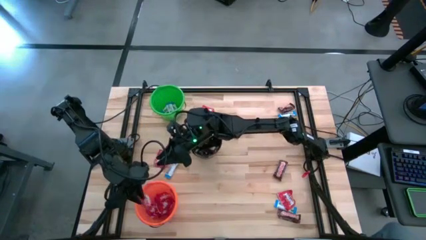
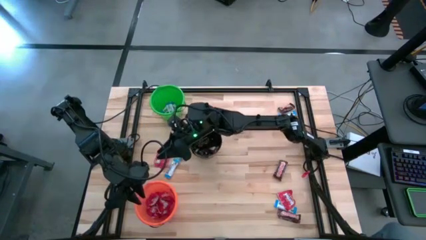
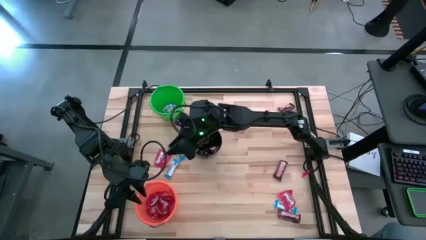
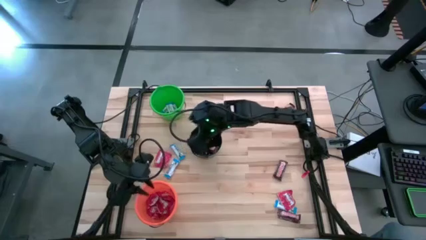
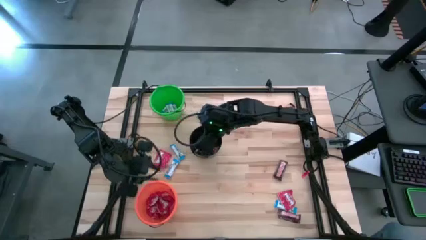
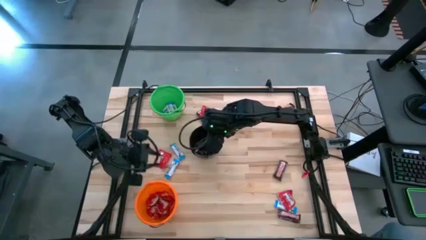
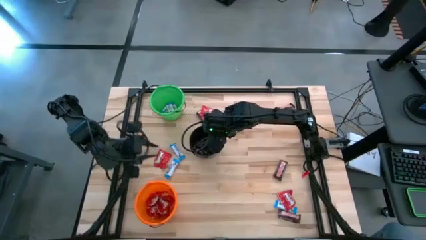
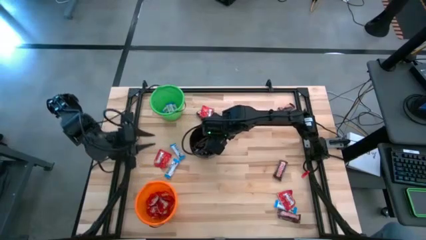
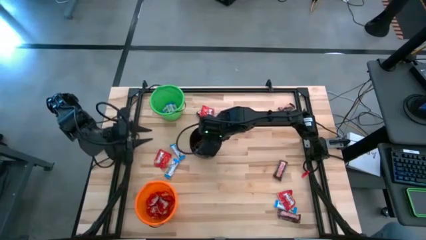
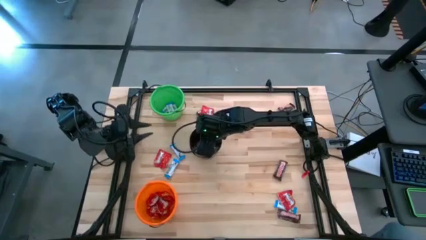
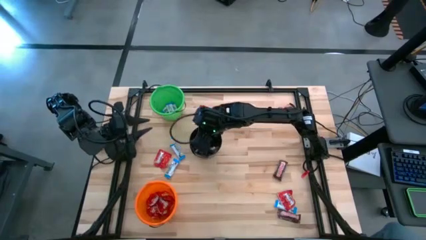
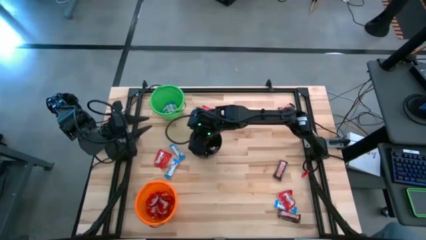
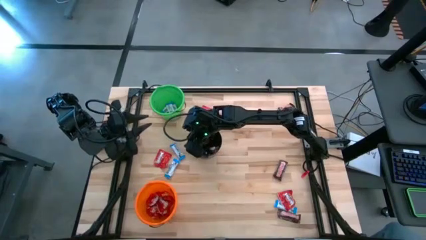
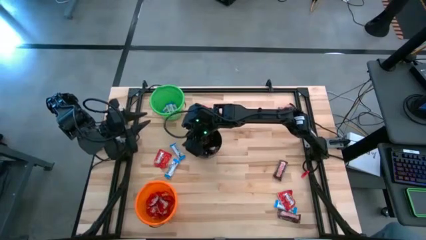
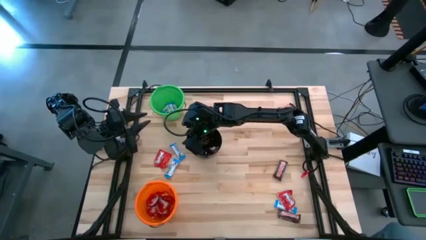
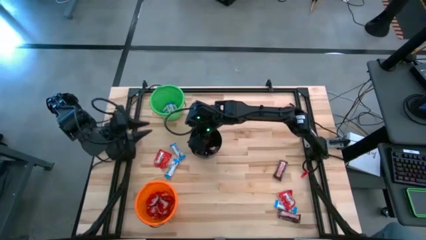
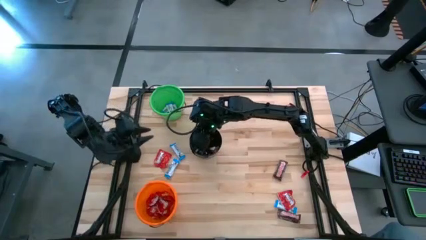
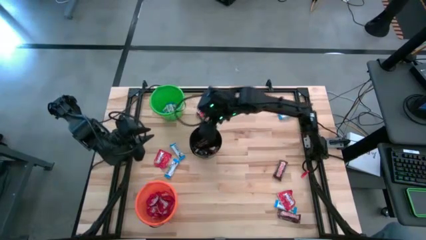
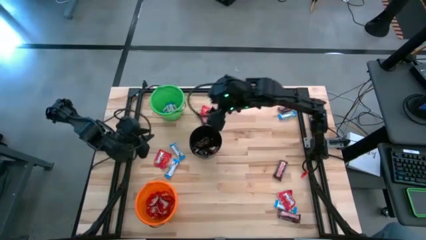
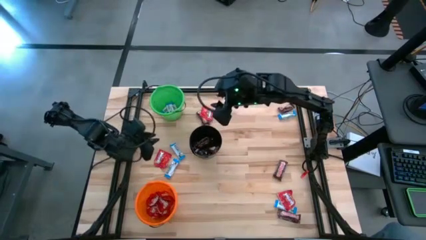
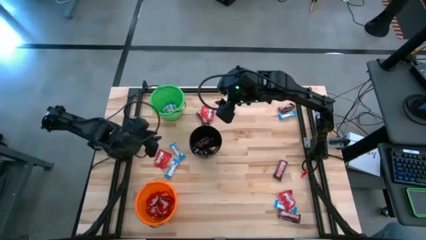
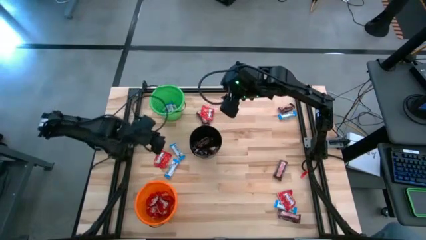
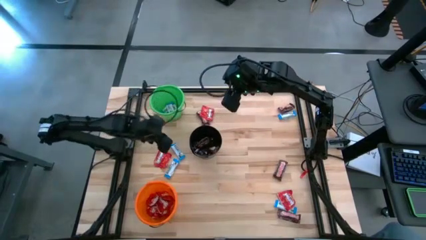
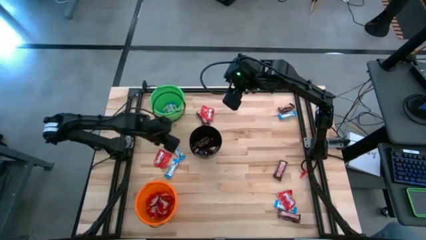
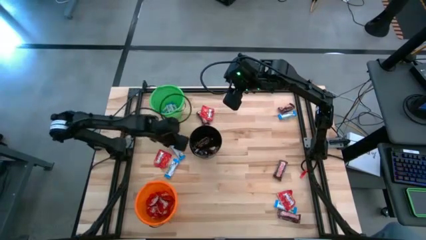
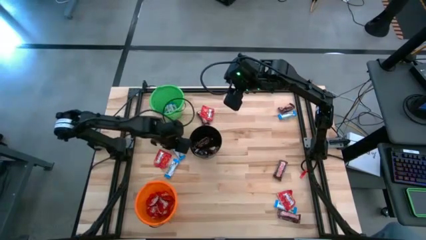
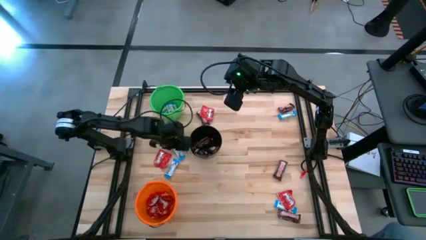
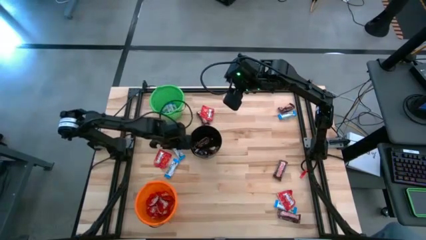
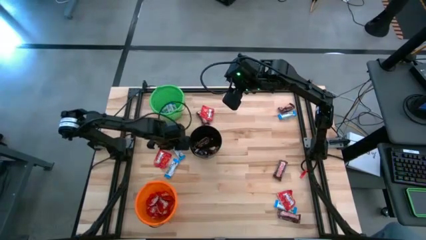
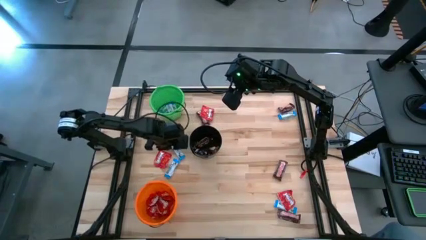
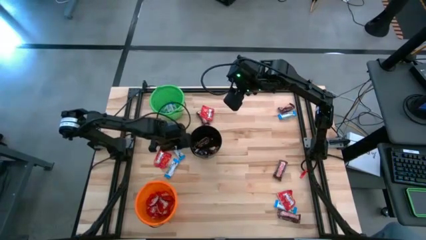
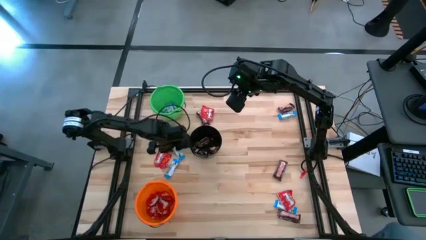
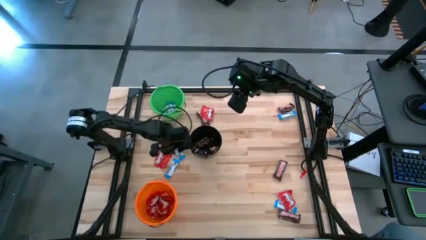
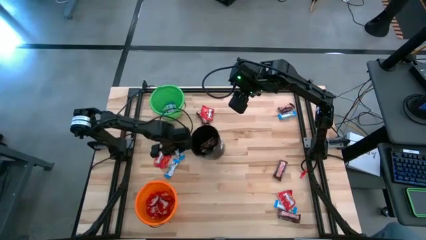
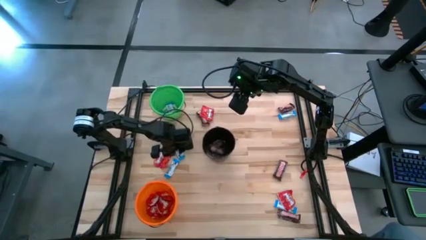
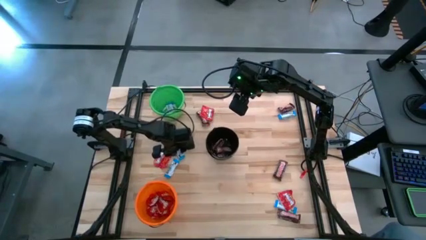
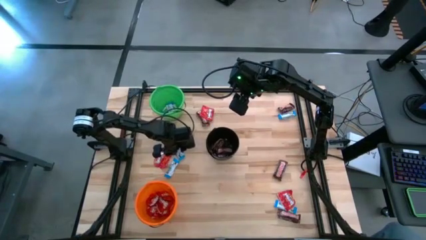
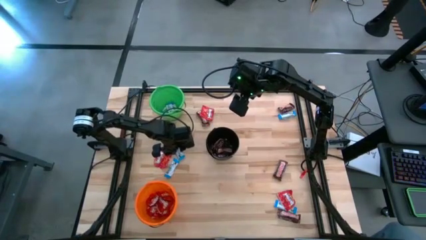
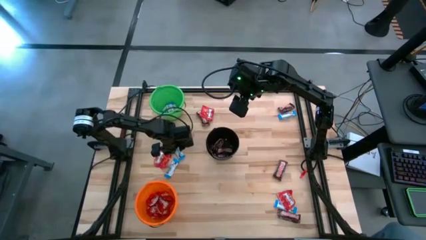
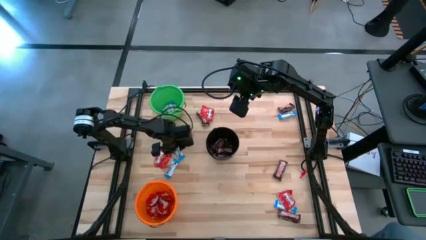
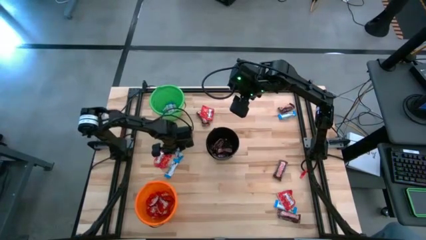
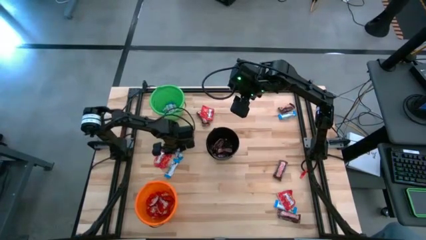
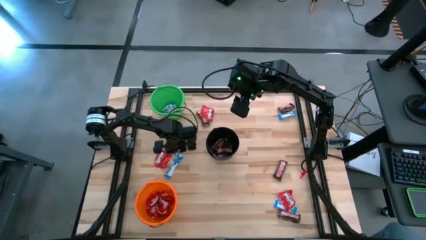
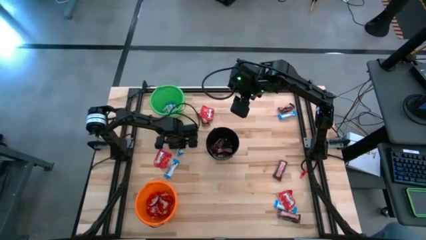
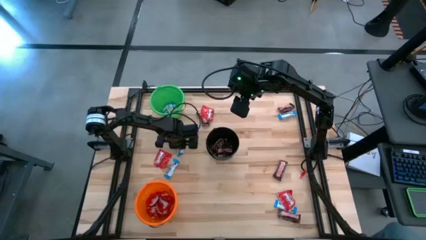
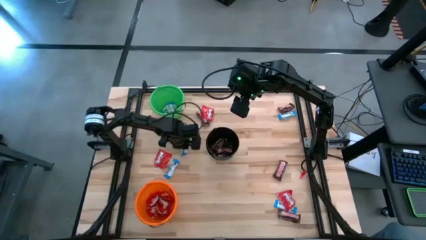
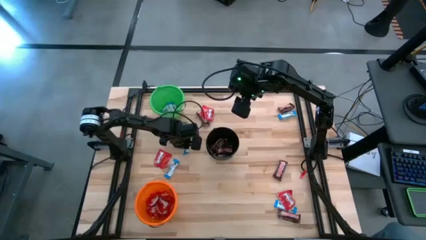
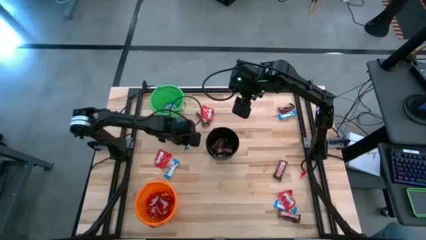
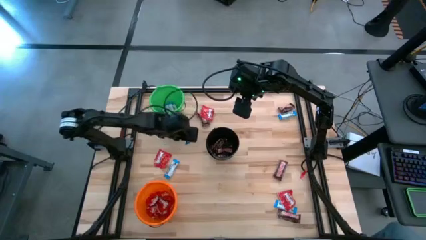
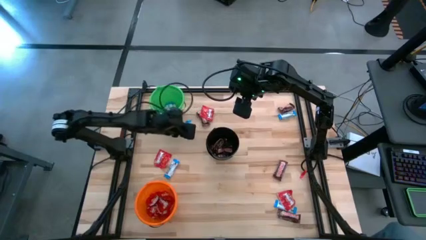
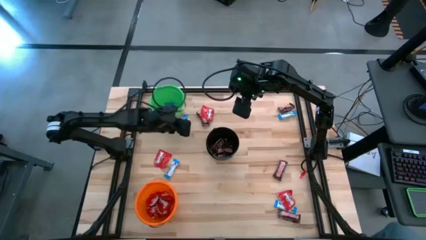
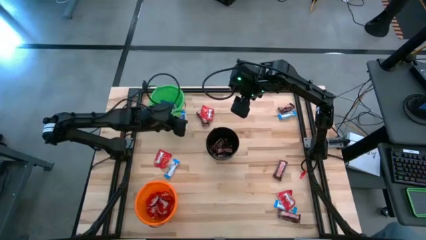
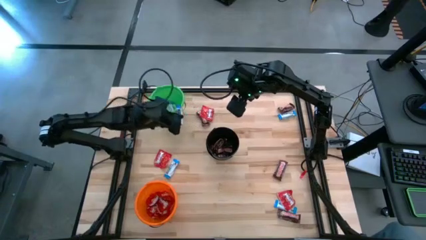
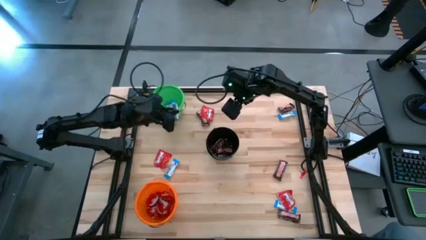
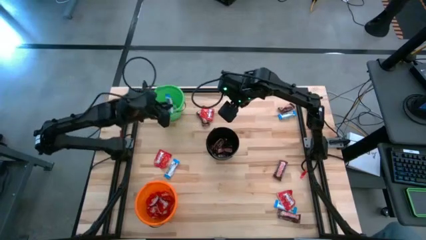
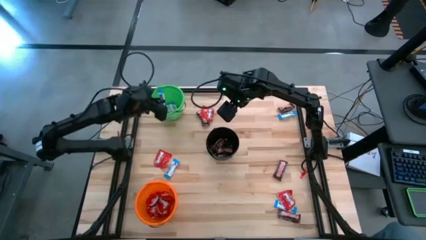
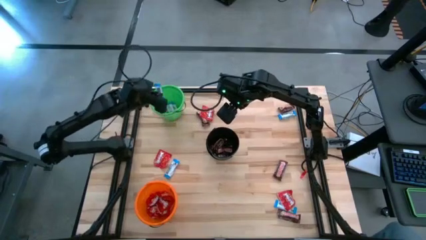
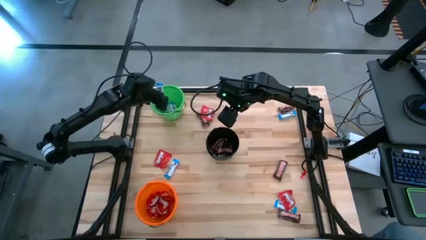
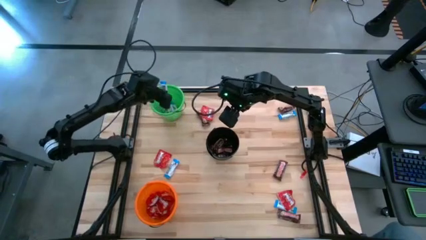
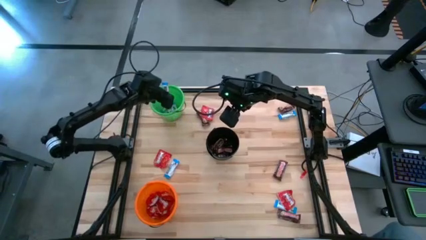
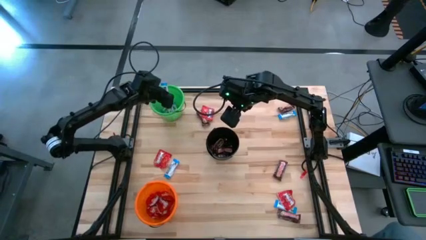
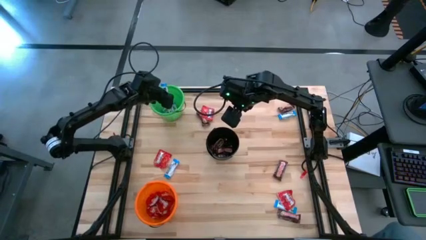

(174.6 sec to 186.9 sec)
Task: Sort candy
Put the white chocolate into the green bucket

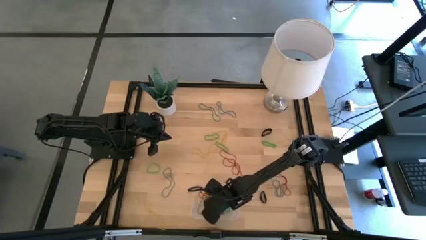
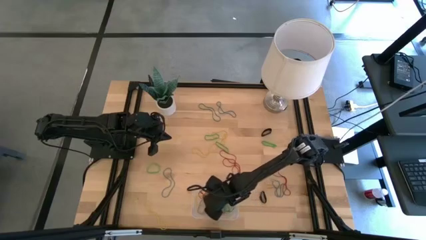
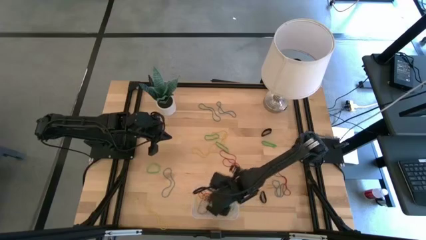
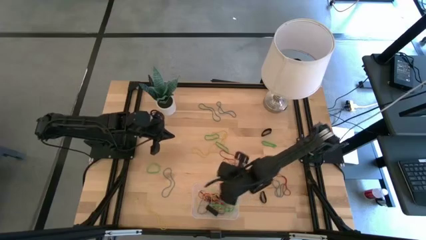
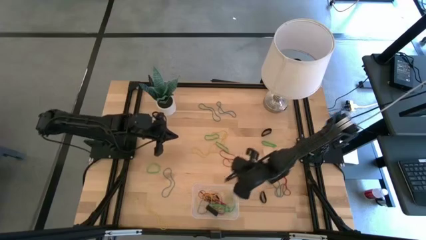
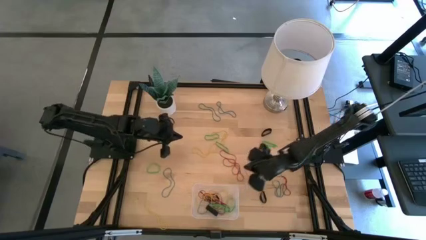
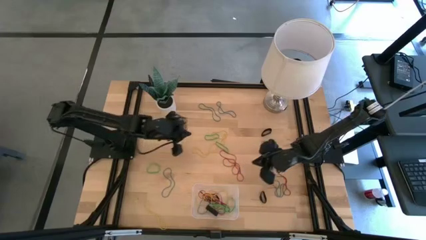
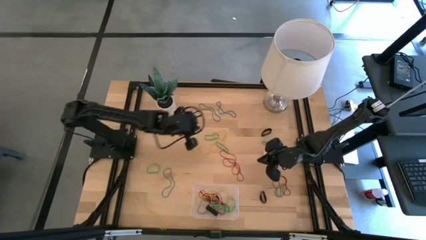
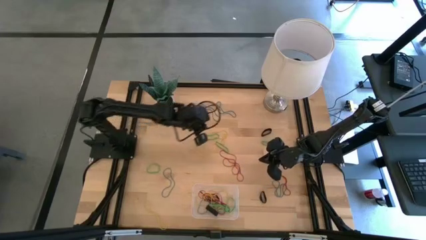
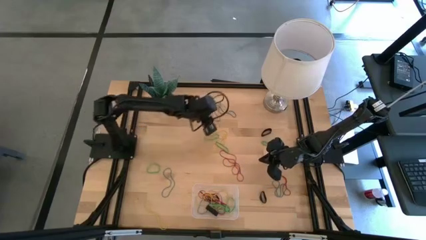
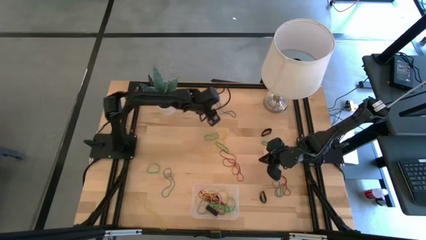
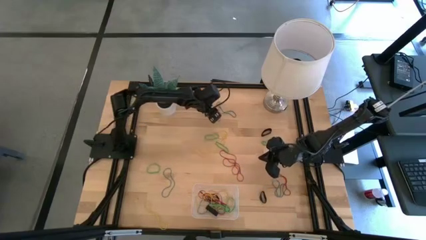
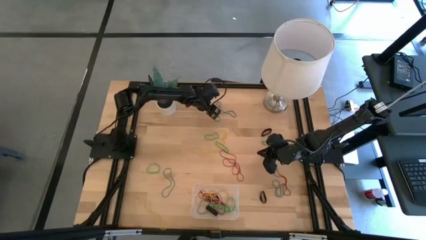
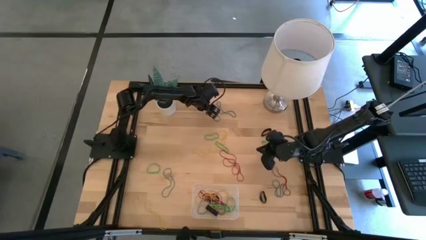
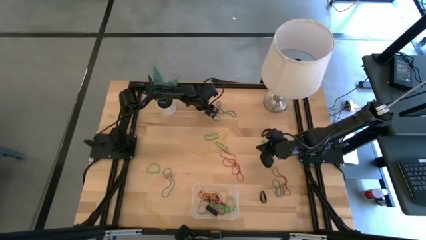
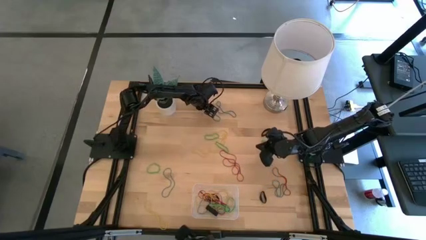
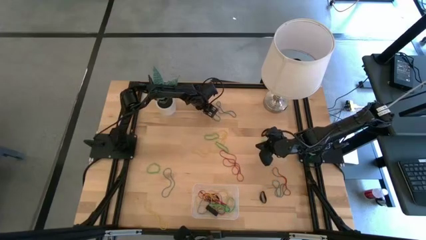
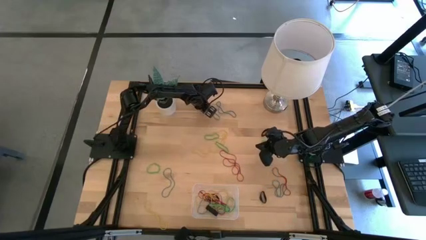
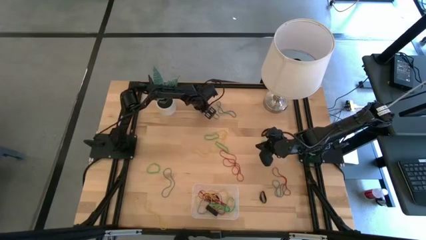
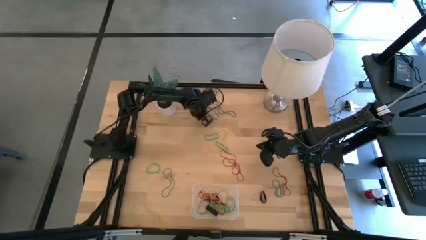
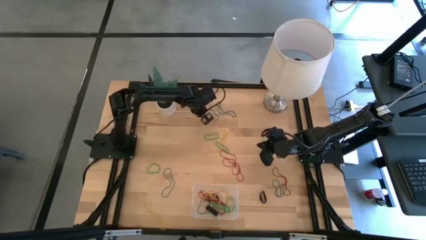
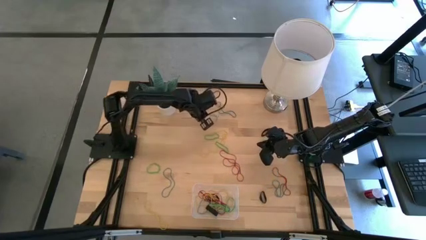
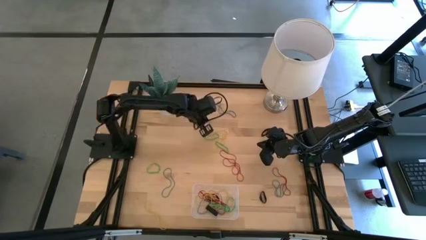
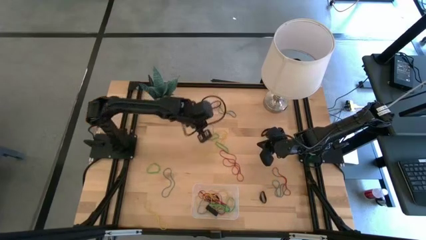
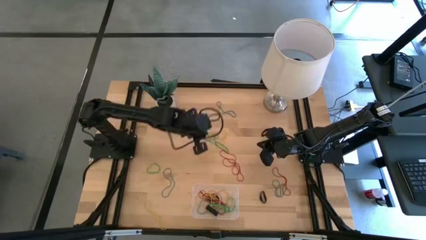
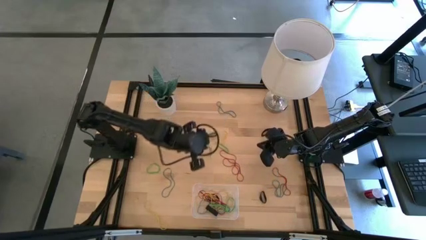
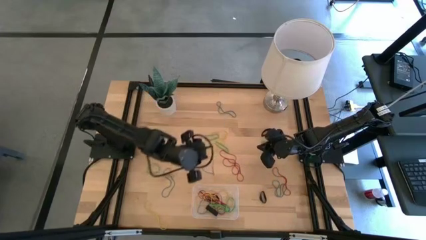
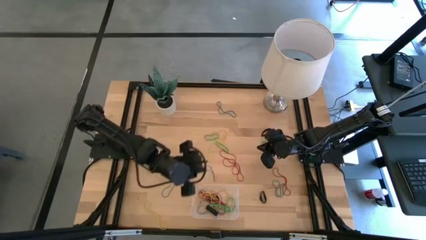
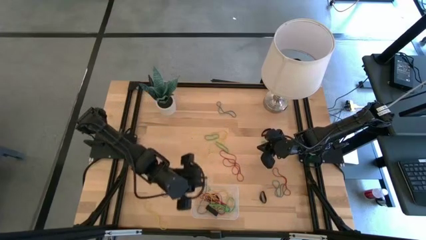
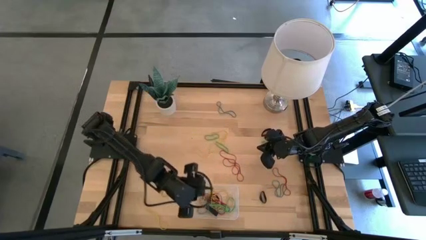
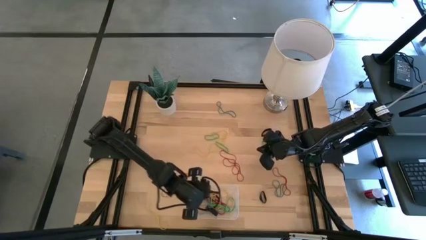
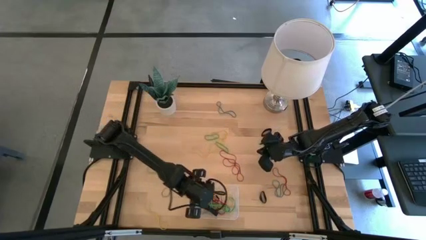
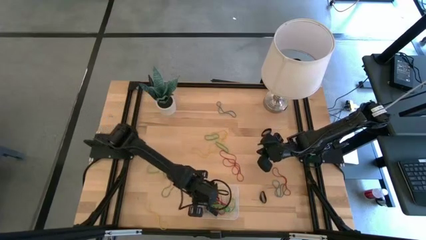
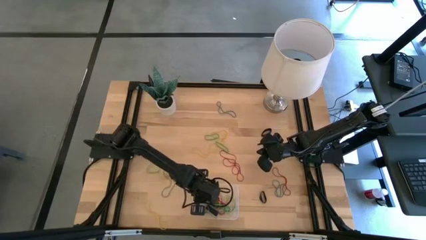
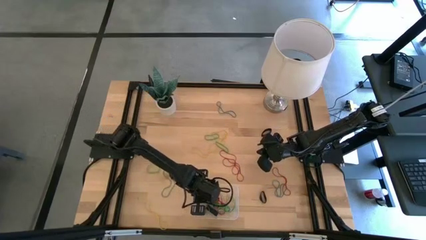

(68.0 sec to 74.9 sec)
Task: Pick and place rubber bands into bin
Put the blue rubber band into the transparent bin
